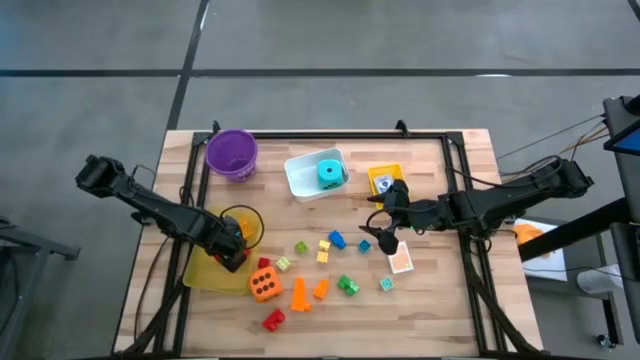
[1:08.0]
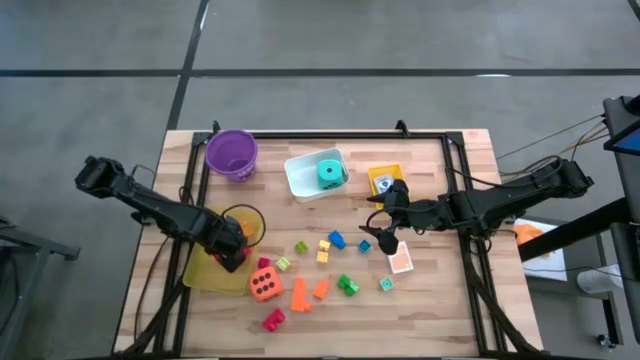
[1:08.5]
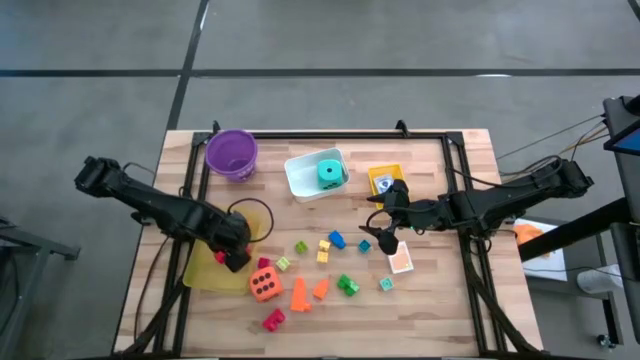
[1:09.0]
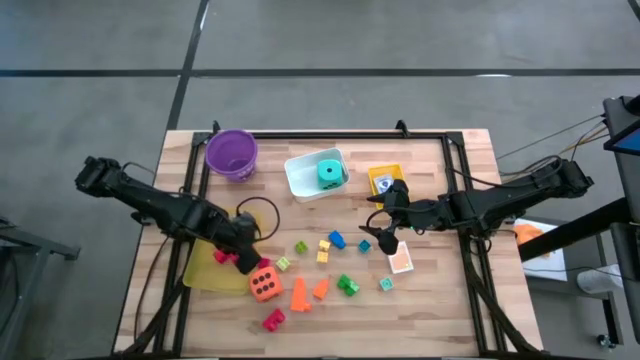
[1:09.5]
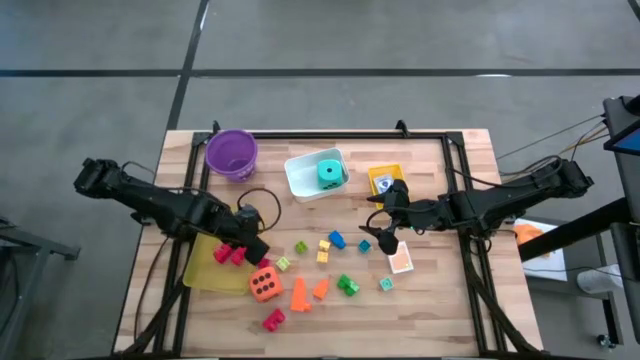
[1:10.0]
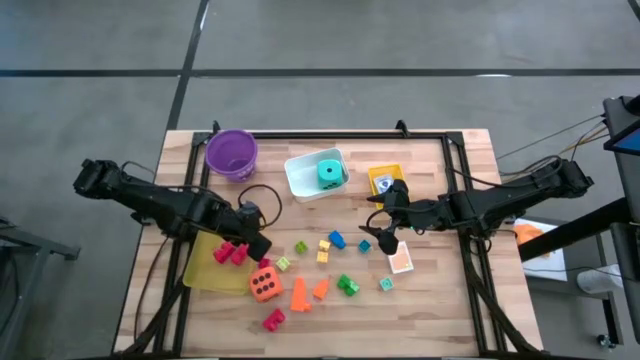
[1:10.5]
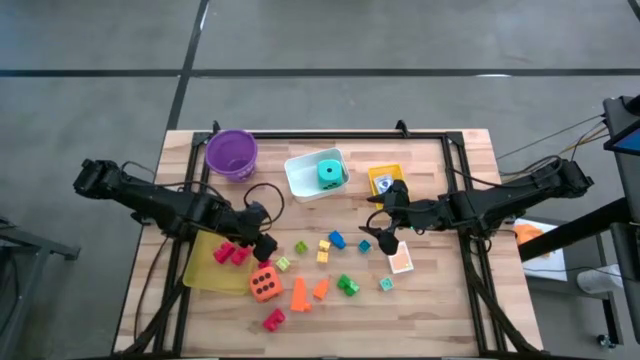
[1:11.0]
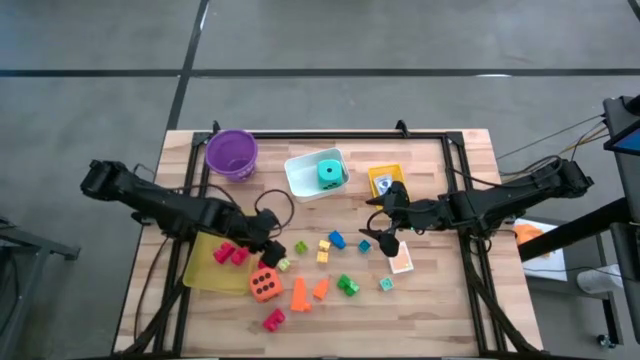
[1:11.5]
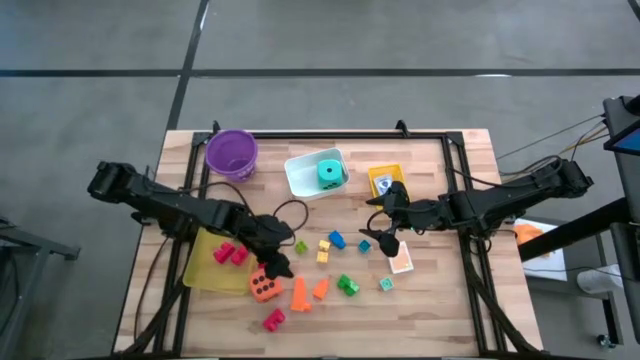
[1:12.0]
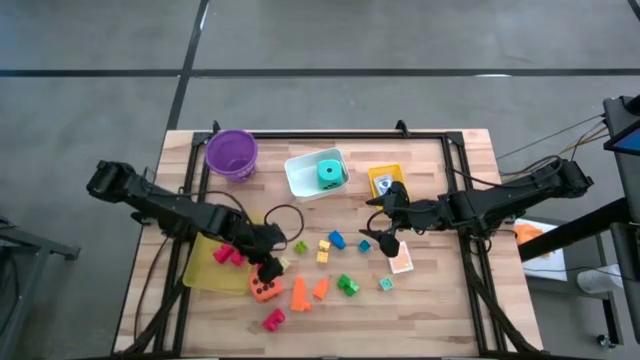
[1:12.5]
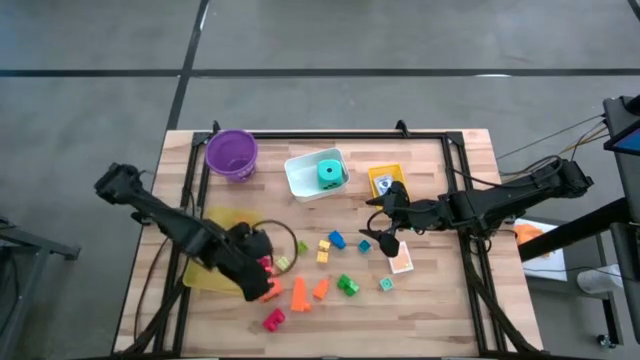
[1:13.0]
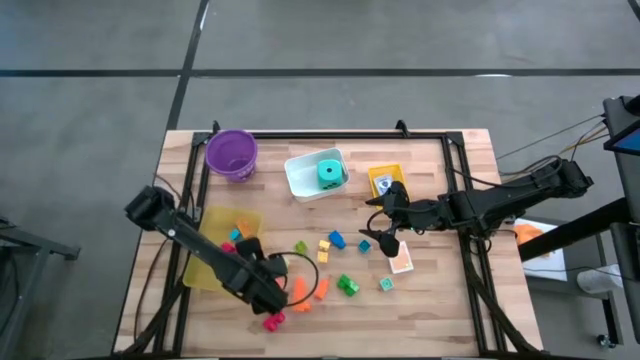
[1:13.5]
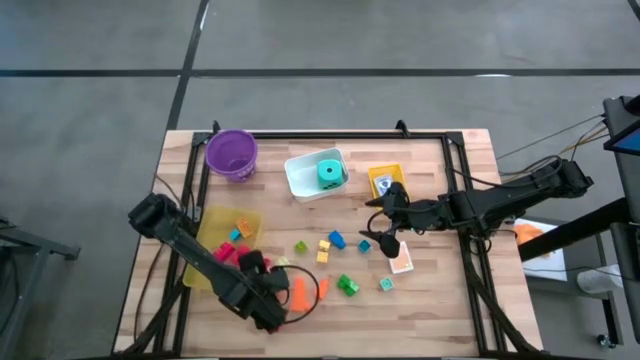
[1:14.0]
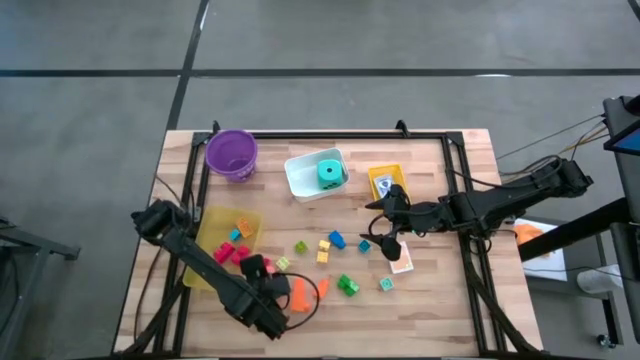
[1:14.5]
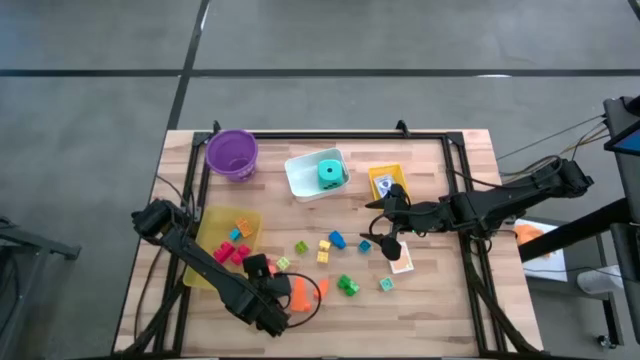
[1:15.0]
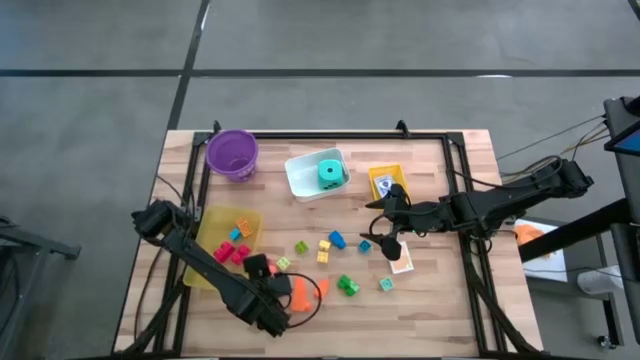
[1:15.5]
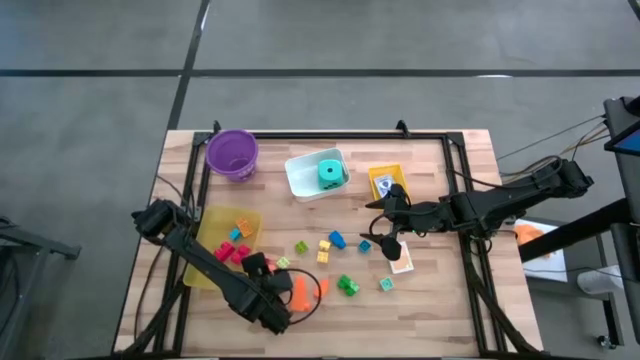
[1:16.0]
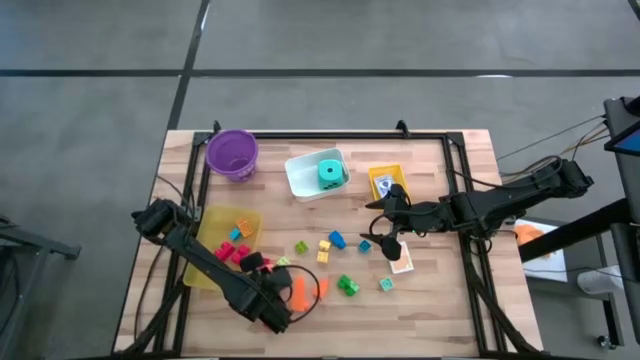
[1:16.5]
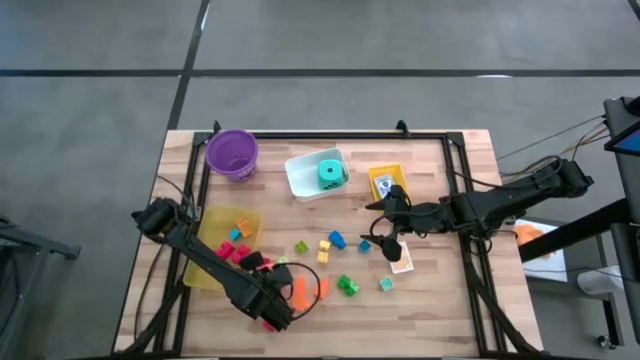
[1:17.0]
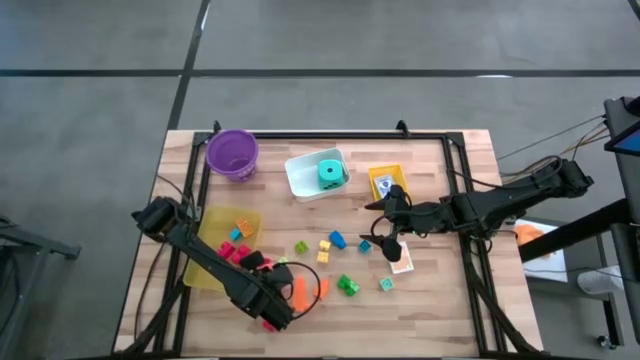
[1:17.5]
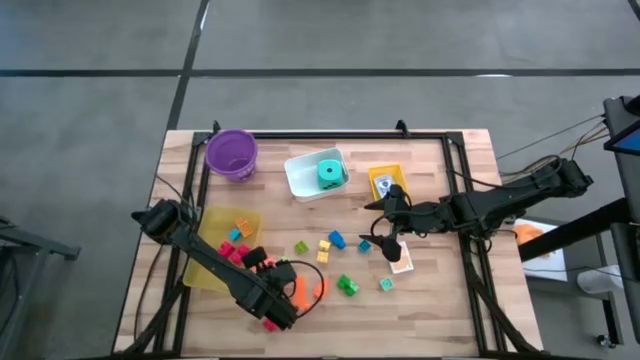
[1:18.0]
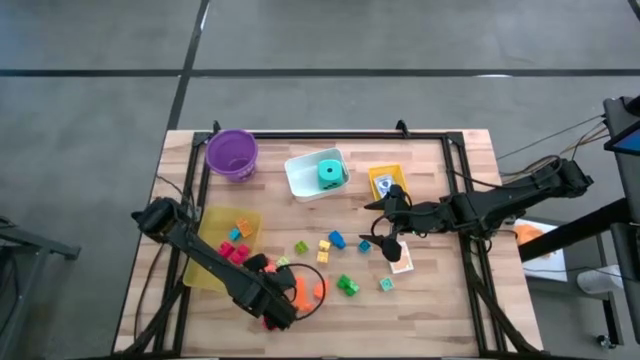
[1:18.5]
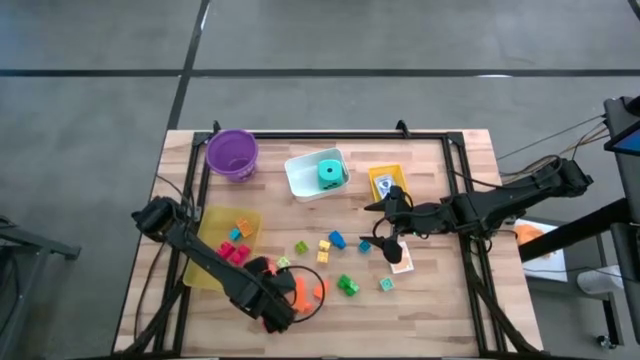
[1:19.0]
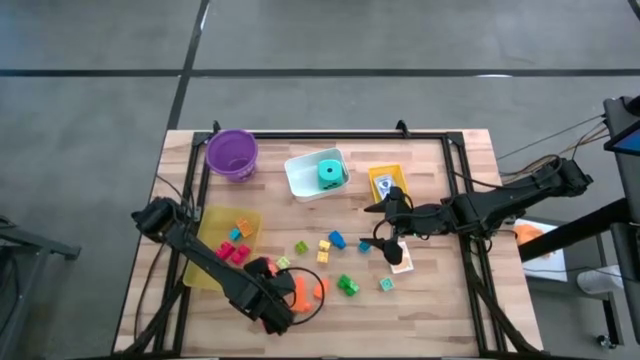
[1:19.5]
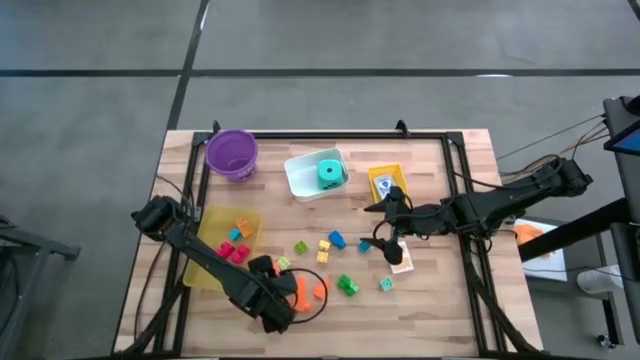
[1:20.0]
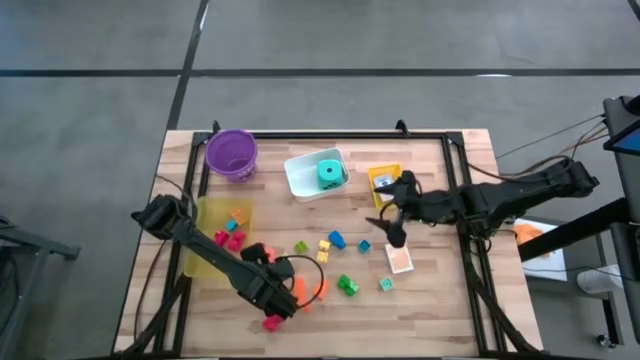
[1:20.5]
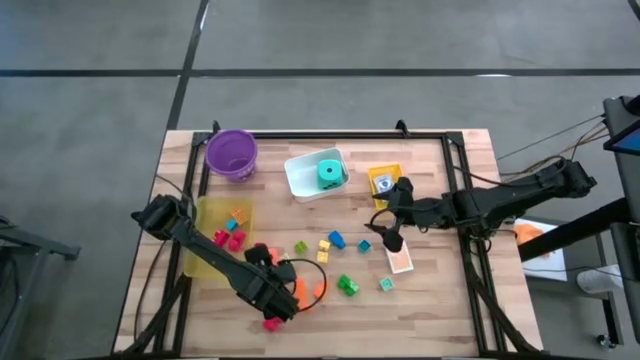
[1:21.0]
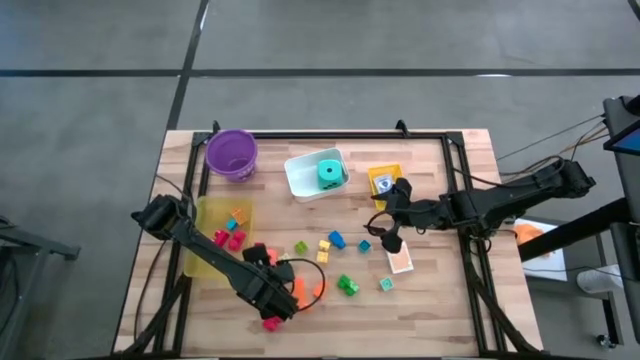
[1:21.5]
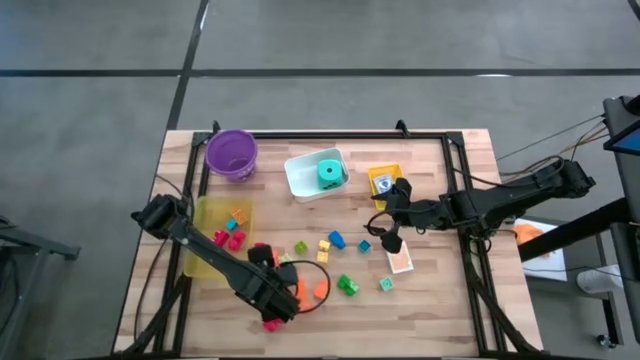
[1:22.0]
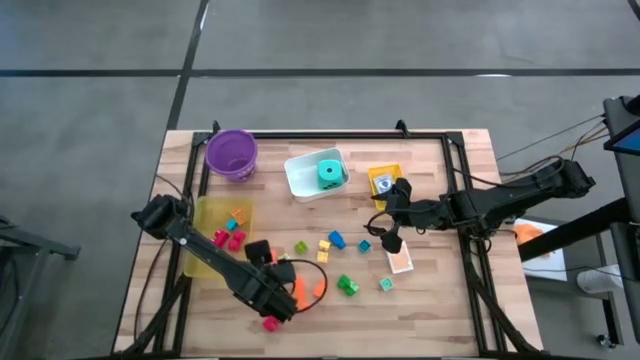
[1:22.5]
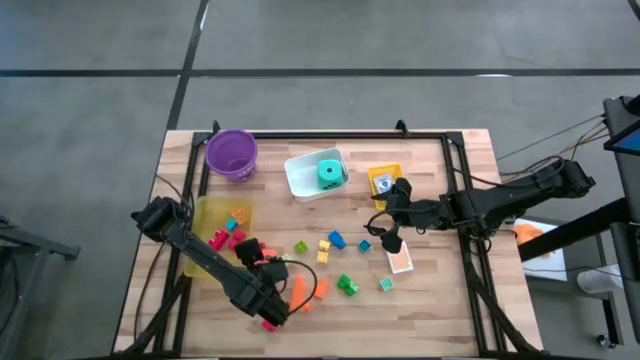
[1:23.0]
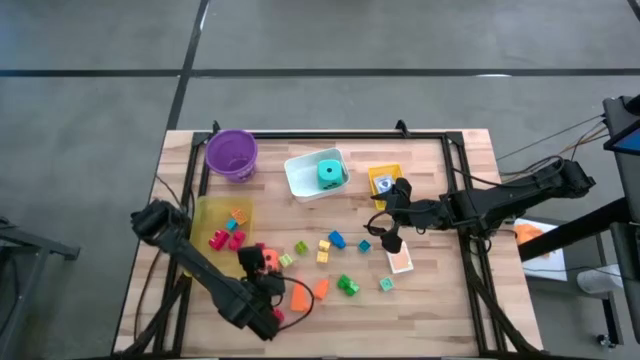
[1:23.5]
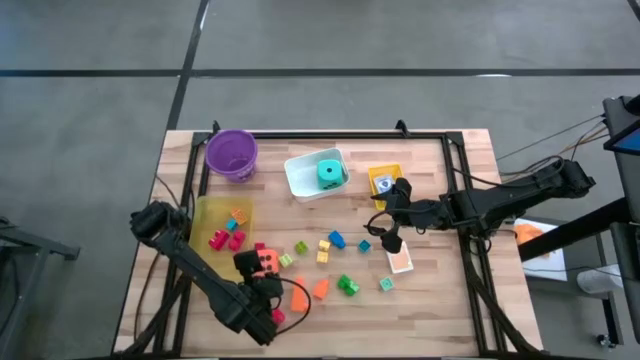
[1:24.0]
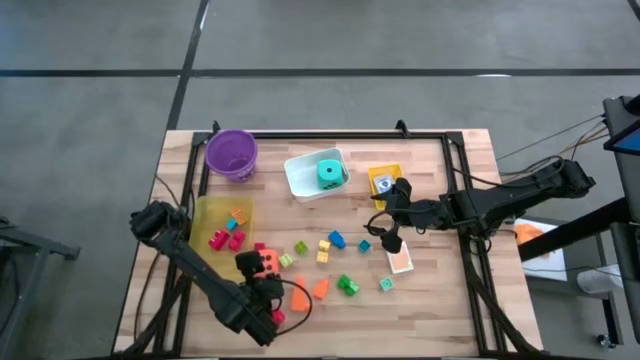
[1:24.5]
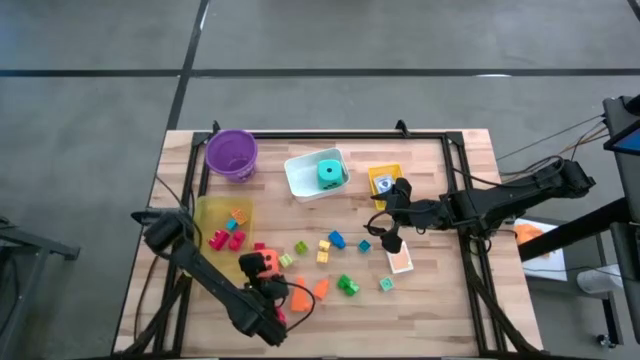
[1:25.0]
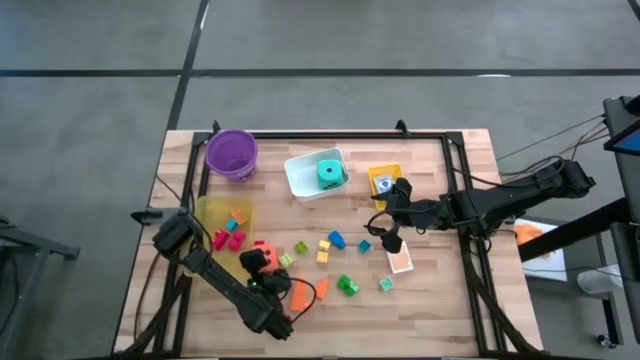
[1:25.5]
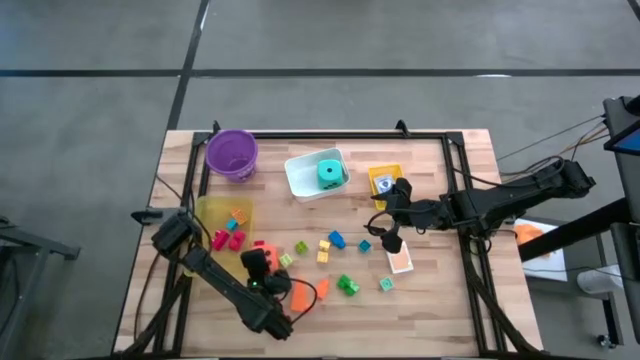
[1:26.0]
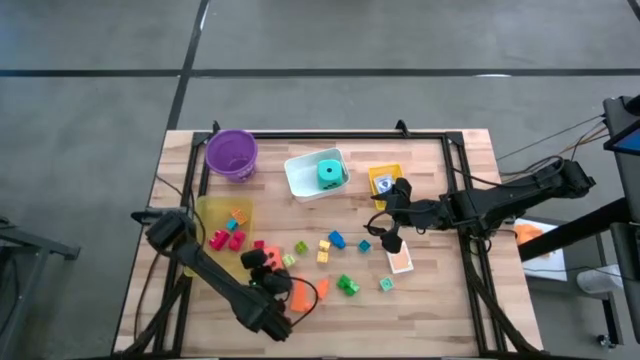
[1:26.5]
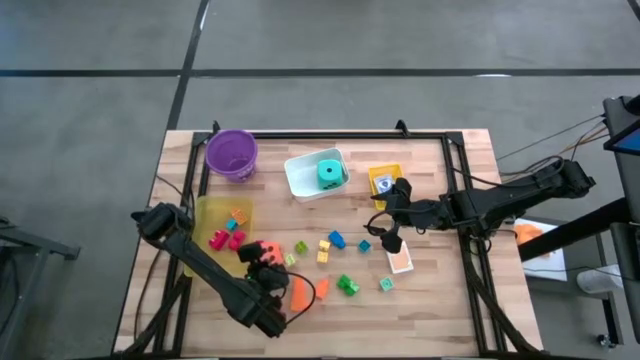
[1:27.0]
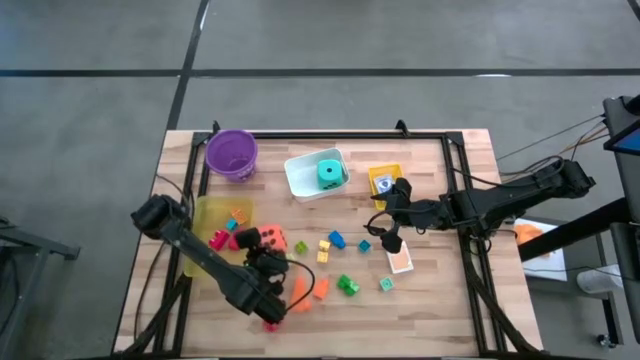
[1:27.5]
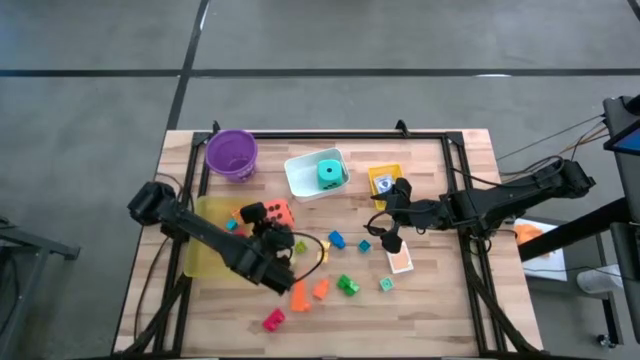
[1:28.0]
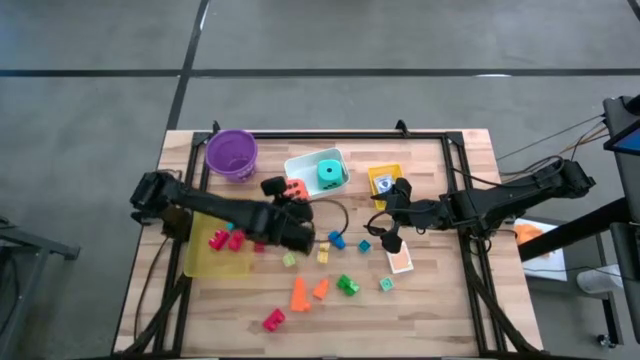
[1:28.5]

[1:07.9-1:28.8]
Task: Pick & Place Toys
Put the orange dice into the white bin
